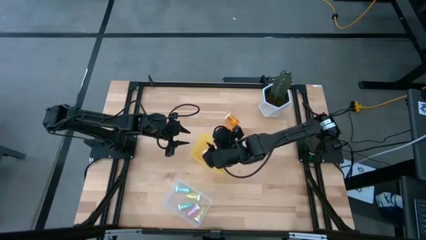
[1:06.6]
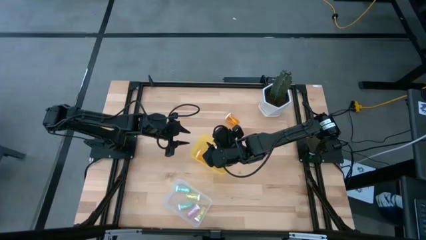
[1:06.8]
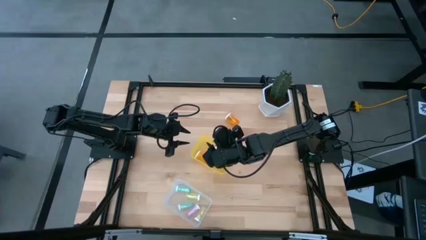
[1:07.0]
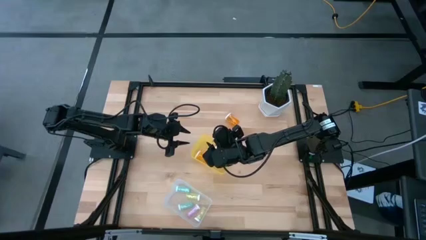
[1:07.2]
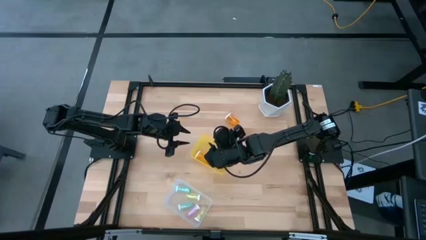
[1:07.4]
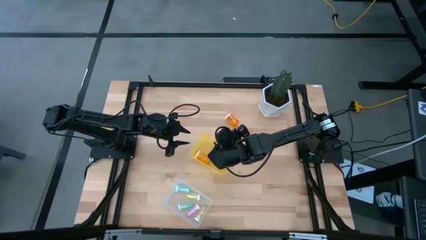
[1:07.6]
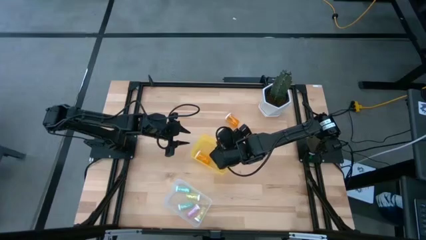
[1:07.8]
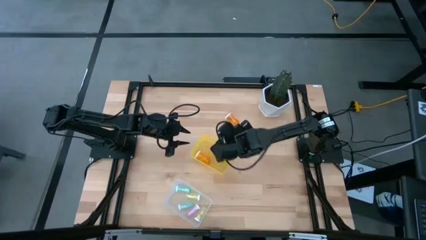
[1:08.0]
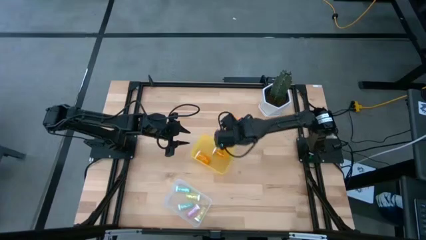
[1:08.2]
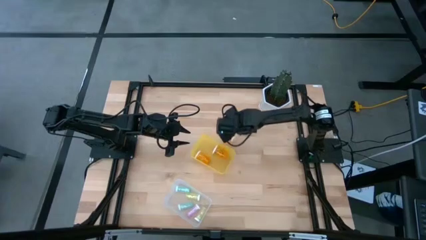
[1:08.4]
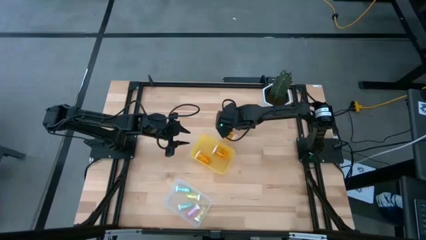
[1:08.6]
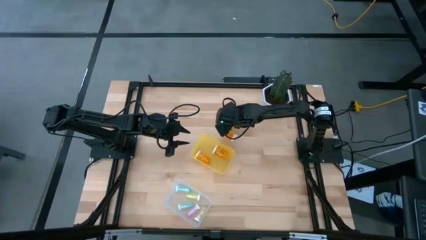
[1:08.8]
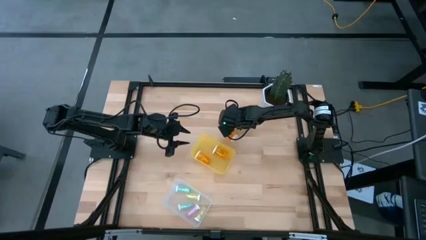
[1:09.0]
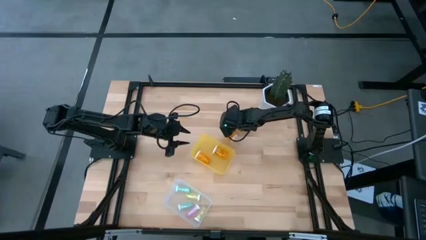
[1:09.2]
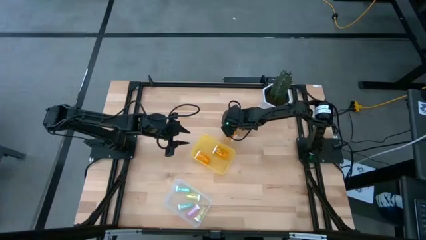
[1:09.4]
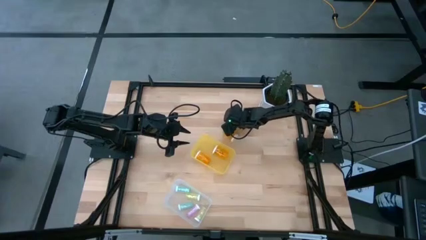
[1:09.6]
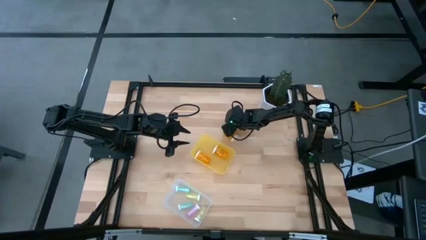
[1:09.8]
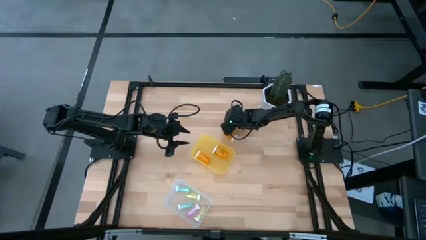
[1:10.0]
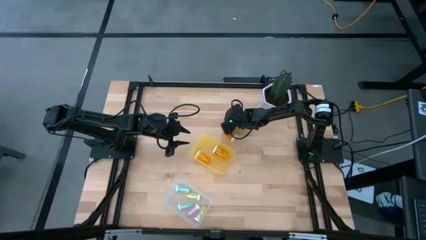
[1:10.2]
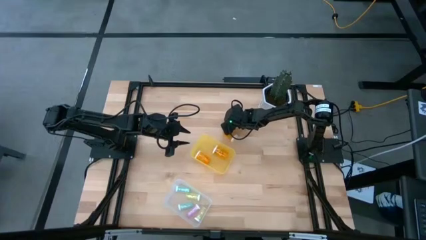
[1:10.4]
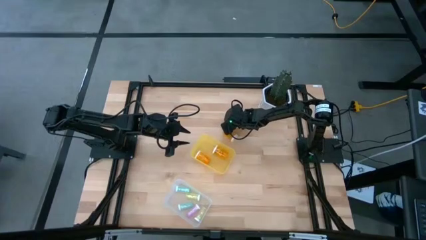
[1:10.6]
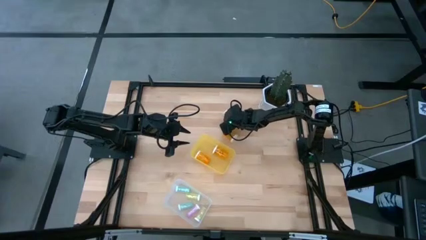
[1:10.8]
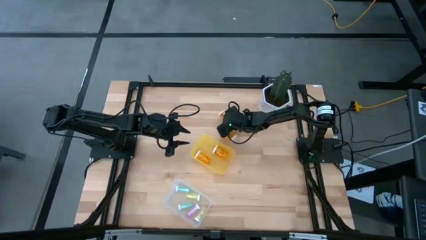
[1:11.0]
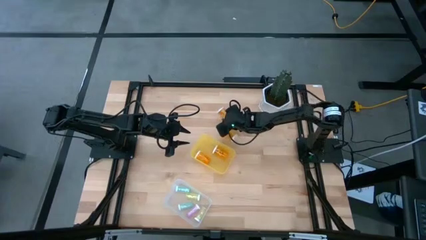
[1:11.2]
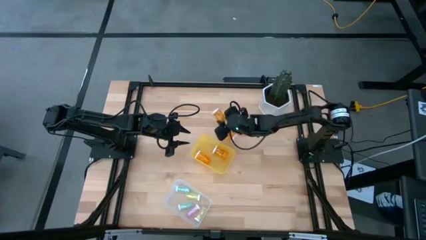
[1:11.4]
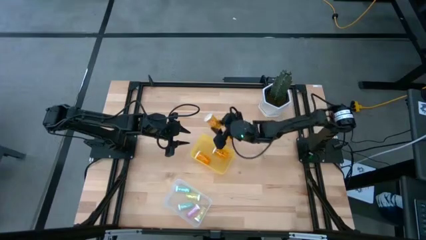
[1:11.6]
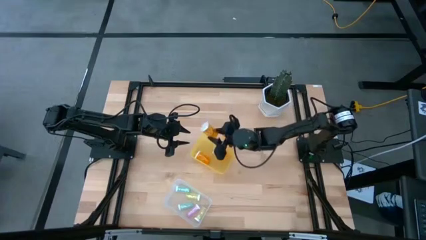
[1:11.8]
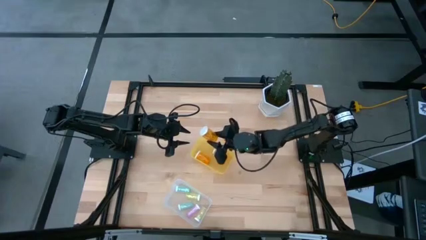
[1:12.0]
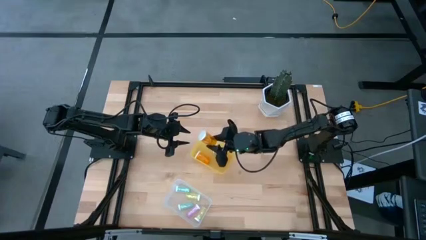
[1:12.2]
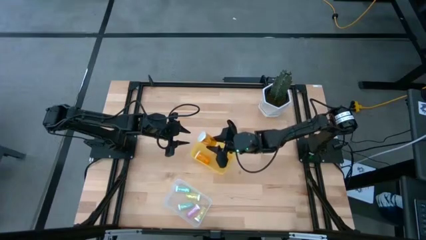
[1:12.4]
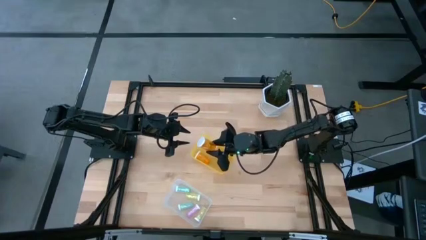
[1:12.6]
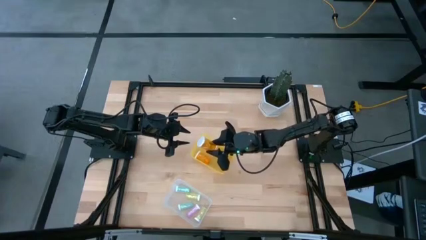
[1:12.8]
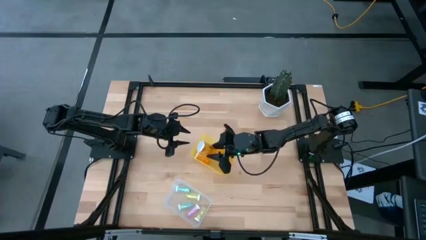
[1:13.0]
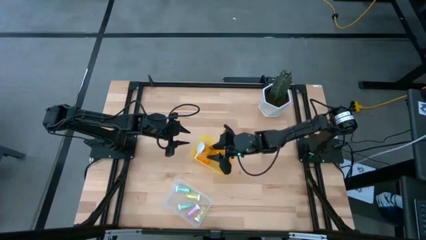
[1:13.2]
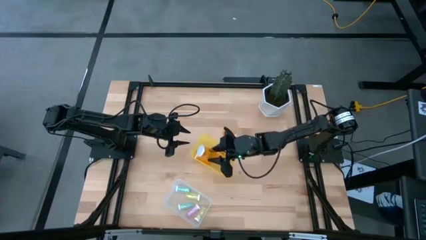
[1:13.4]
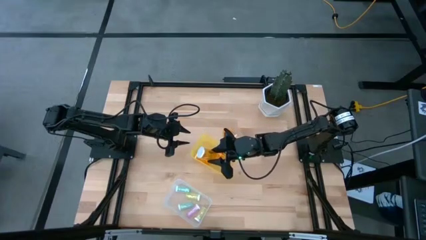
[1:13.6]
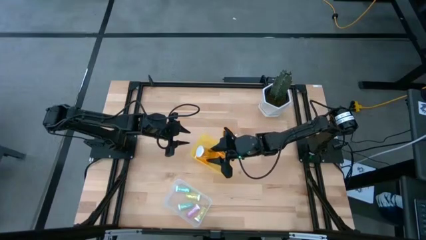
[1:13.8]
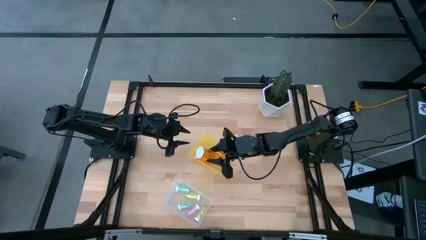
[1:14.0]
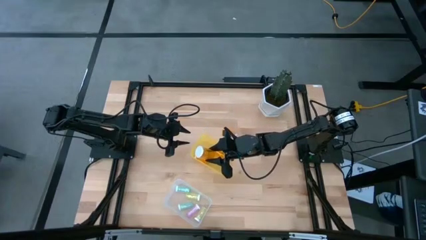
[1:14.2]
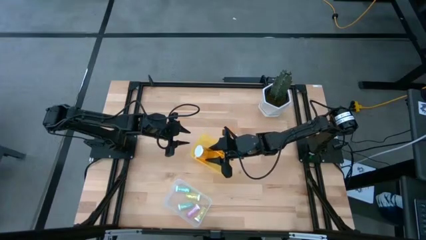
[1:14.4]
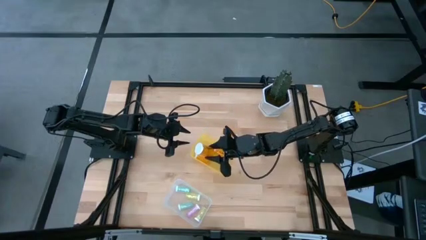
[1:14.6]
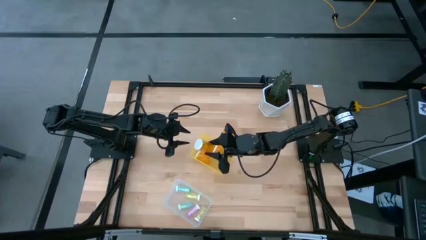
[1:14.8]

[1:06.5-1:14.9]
Task: Pick and place medicine bottles into bin by pill shape (circle, oval)
Put the orange bottled capsule into the yellow bin

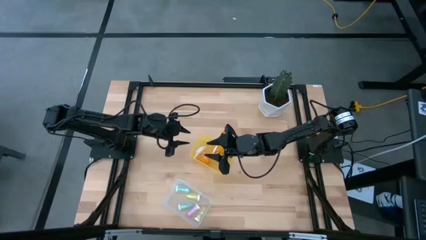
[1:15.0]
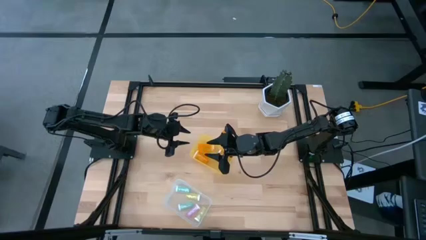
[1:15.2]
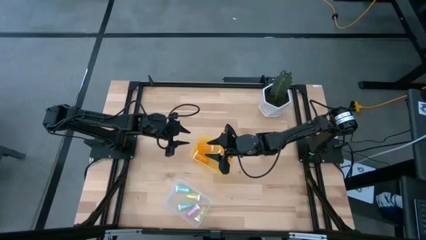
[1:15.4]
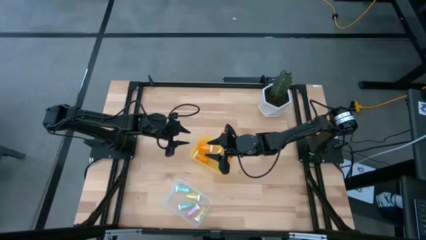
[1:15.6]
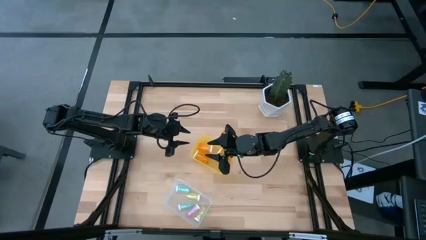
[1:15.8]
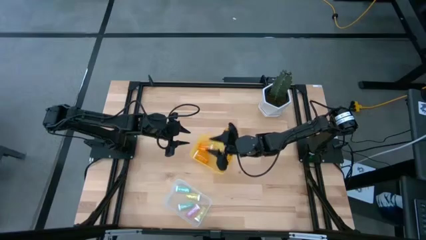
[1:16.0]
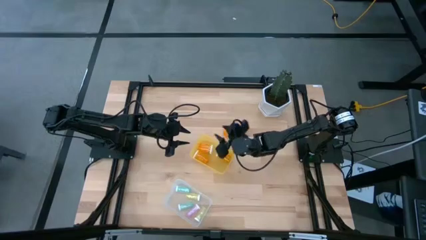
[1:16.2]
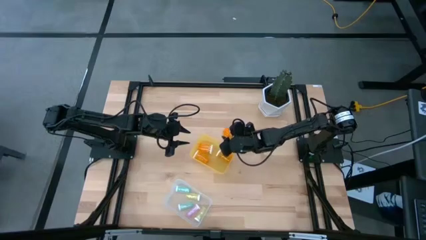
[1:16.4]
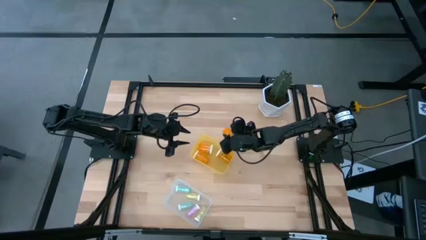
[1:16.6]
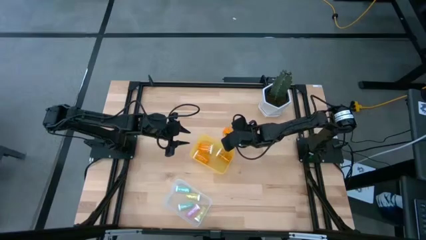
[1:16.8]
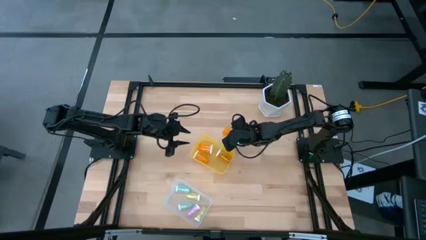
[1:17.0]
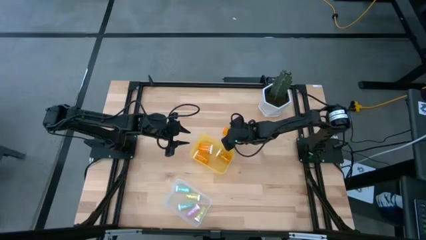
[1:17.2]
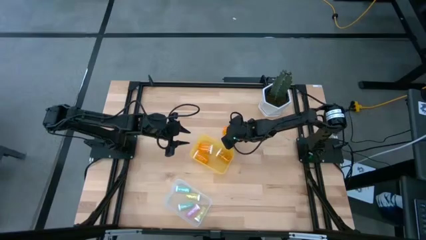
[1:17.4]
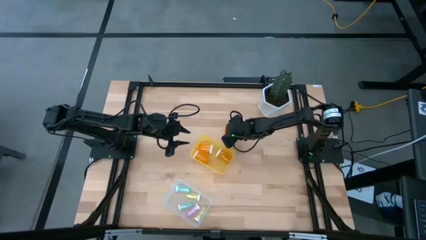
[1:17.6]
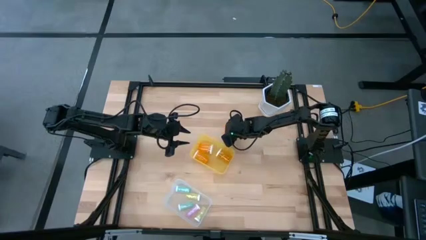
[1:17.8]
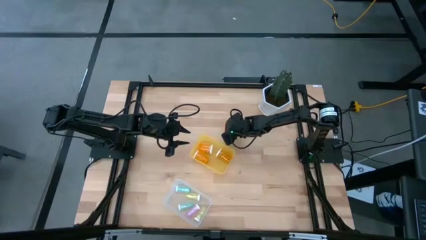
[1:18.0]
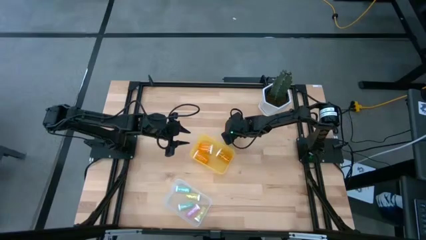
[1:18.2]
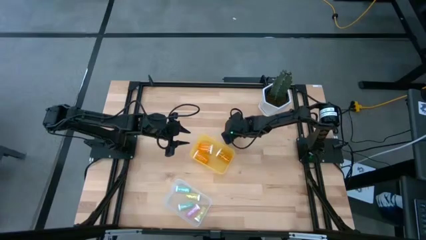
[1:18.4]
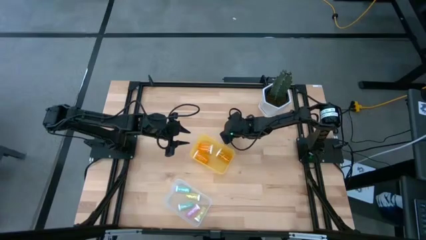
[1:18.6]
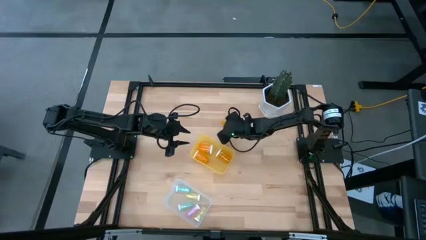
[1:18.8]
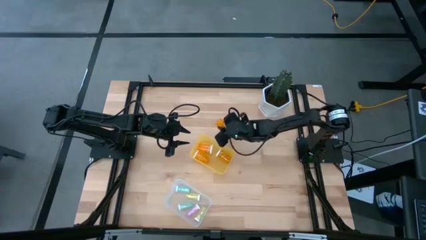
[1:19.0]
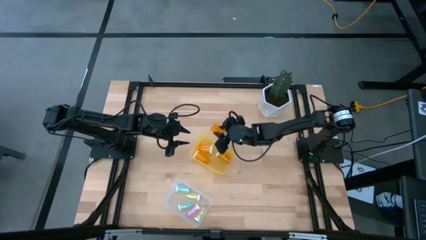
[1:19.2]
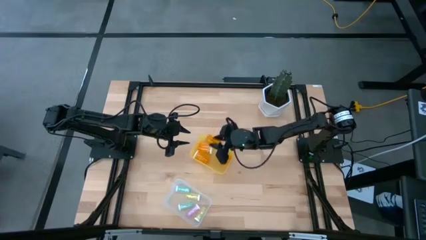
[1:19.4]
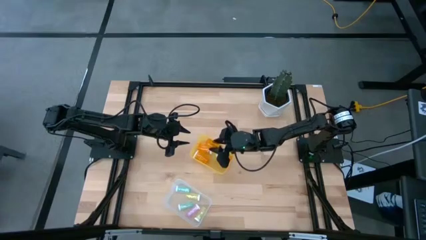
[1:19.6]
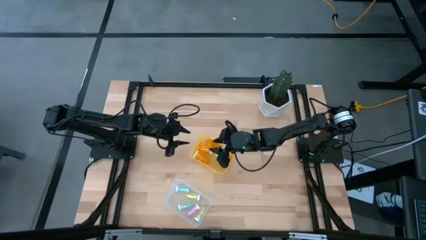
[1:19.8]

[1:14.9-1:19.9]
Put the orange bottled capsule into the yellow bin

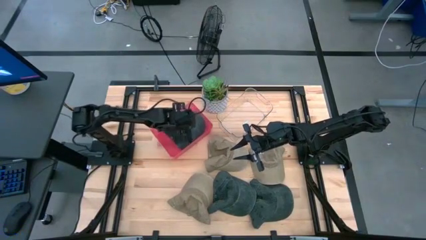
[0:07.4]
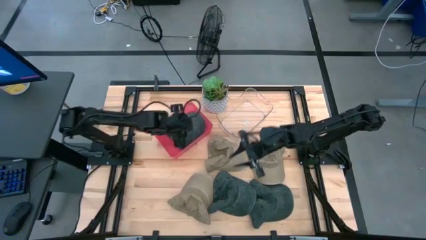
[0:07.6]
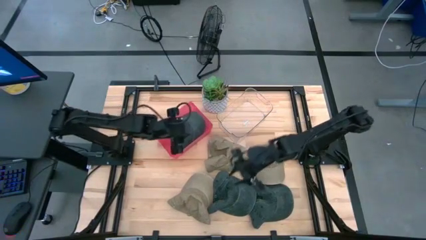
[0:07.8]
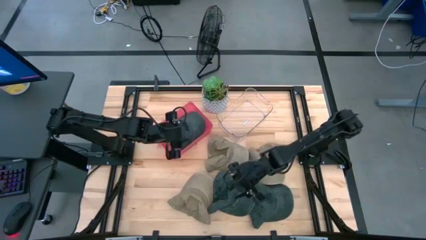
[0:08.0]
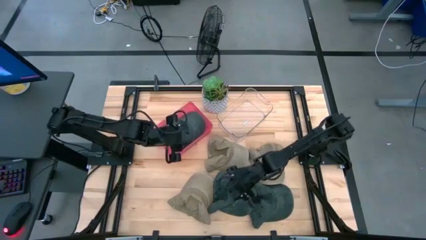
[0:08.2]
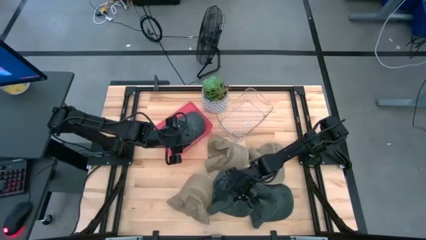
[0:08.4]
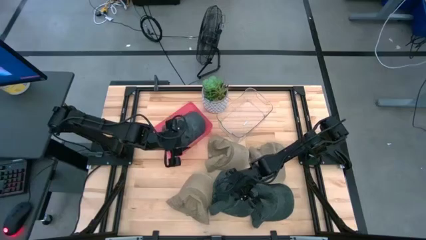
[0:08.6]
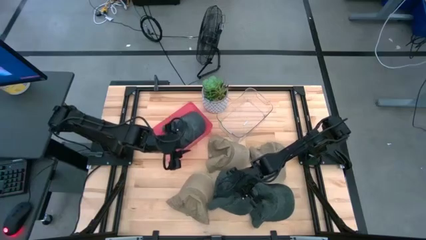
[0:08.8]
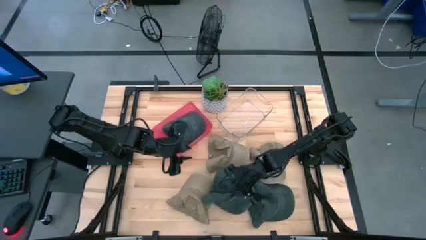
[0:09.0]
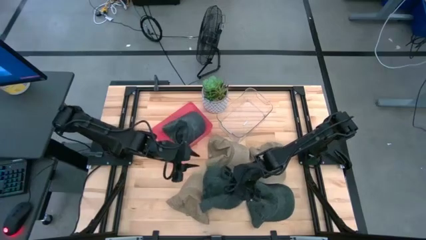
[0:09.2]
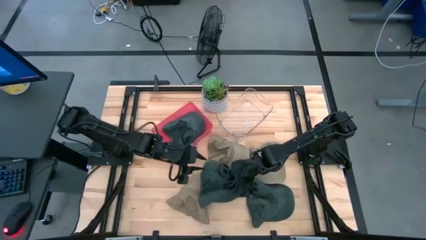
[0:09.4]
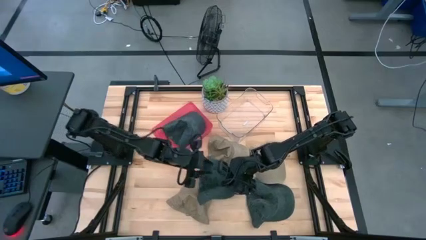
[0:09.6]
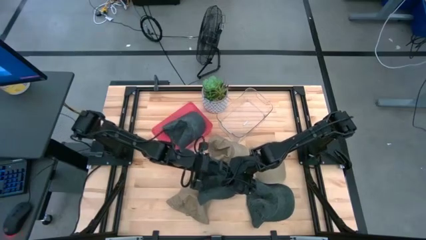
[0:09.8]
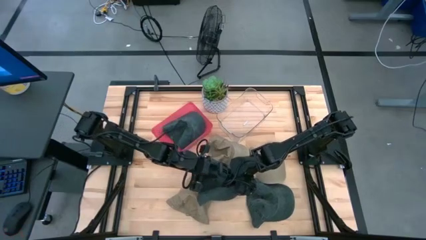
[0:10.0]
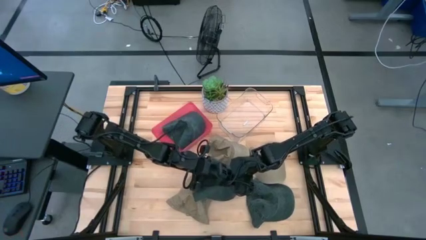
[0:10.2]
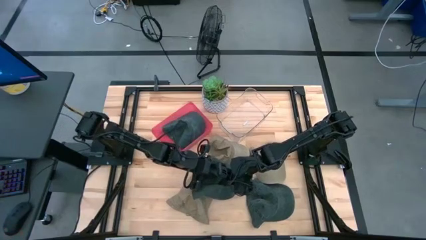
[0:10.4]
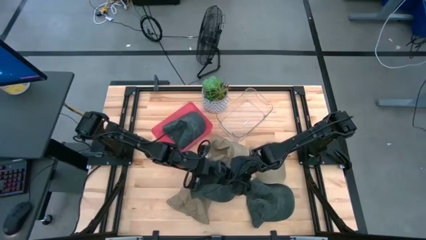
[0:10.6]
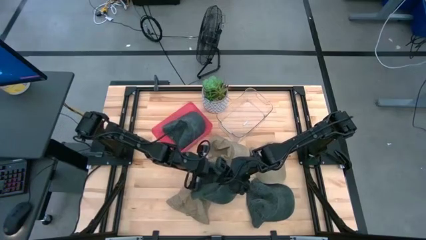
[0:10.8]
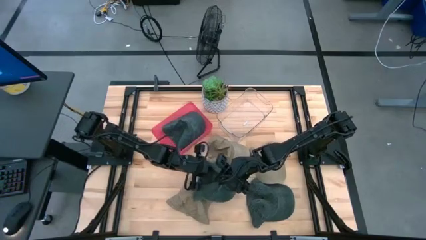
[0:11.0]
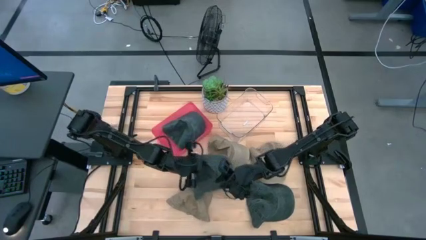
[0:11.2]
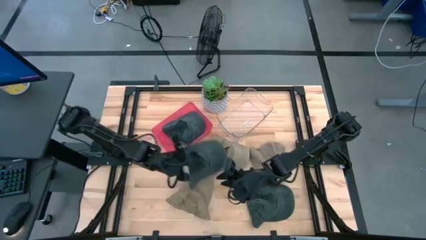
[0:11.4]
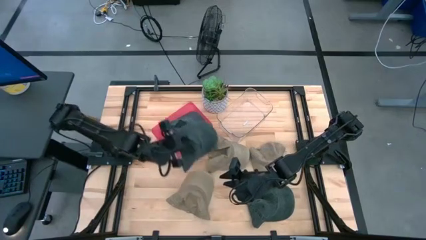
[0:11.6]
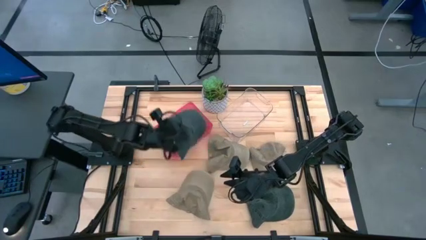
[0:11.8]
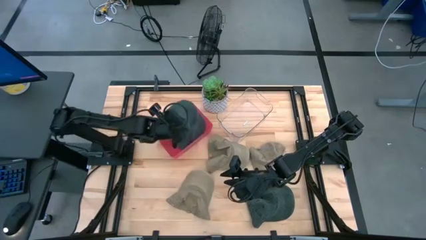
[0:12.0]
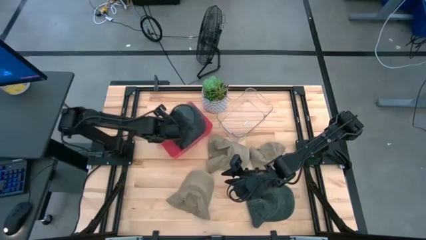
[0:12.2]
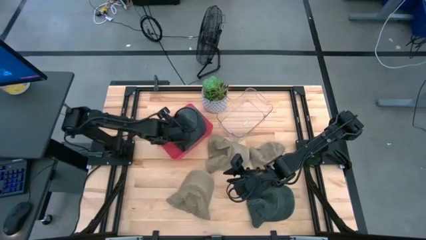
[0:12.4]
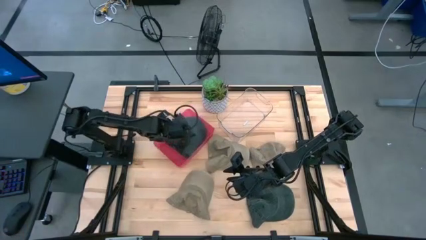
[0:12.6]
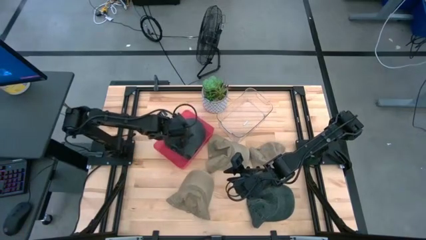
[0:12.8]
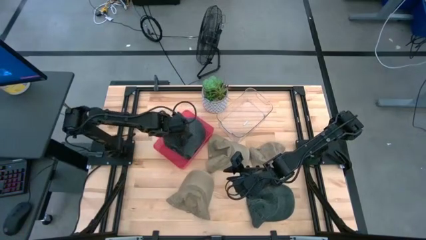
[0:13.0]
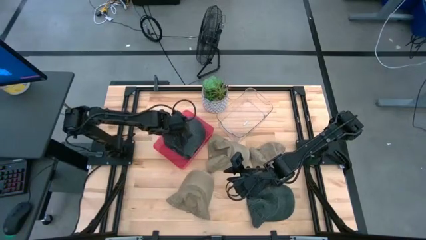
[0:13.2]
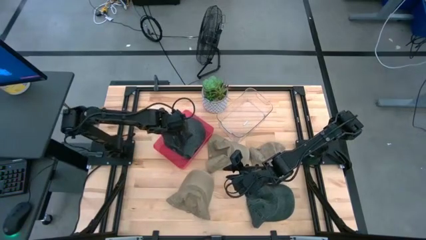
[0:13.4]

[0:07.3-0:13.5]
Task: Pick & Place hat
Put the left blue cap into the red bin
